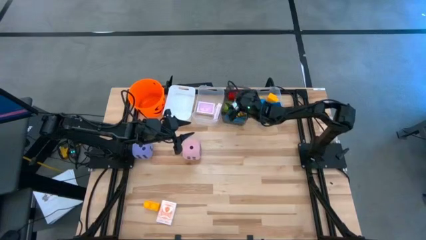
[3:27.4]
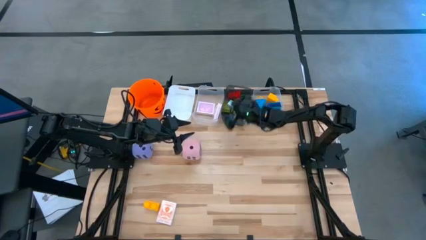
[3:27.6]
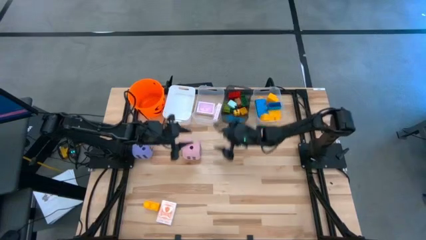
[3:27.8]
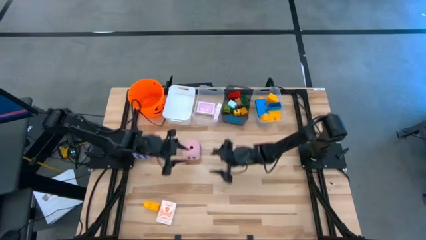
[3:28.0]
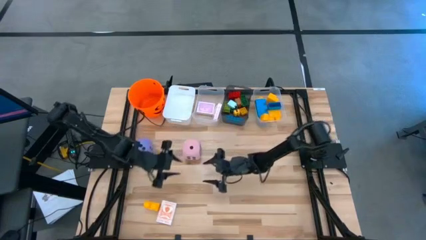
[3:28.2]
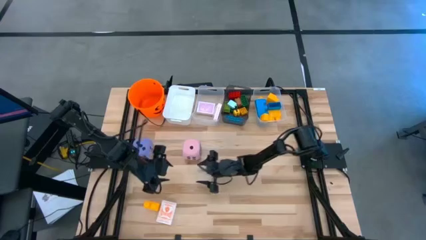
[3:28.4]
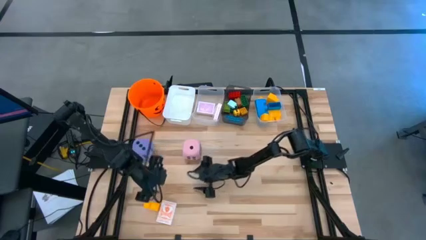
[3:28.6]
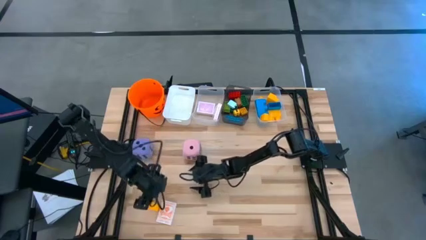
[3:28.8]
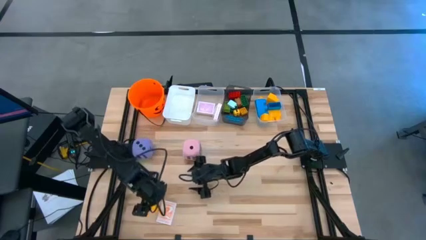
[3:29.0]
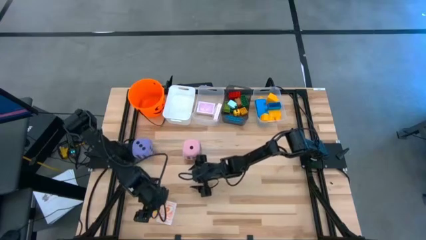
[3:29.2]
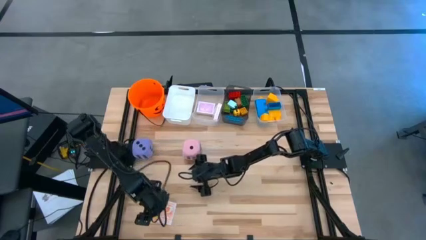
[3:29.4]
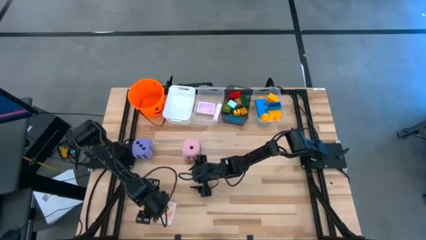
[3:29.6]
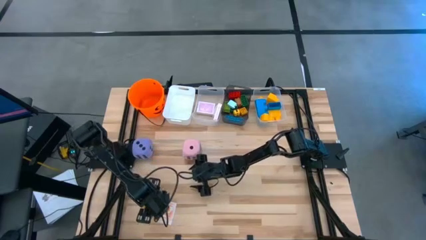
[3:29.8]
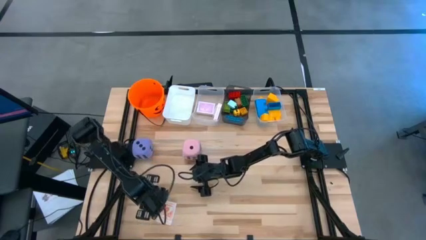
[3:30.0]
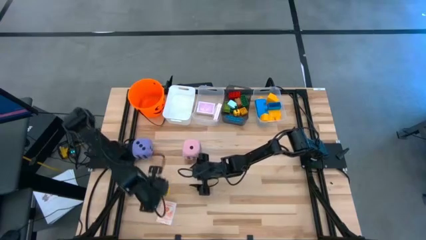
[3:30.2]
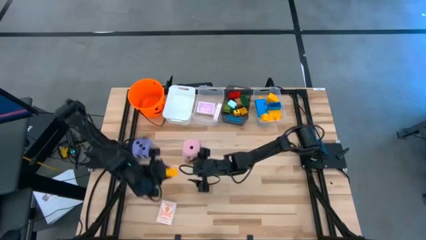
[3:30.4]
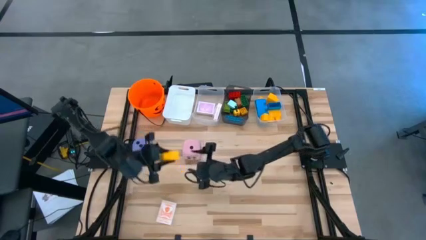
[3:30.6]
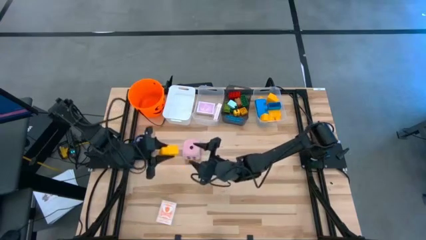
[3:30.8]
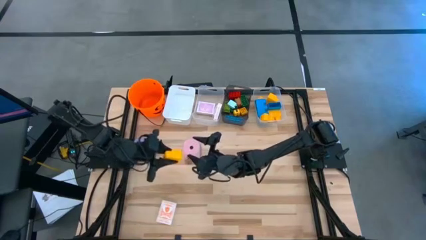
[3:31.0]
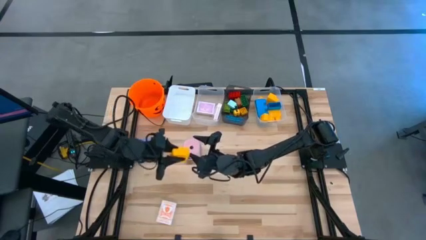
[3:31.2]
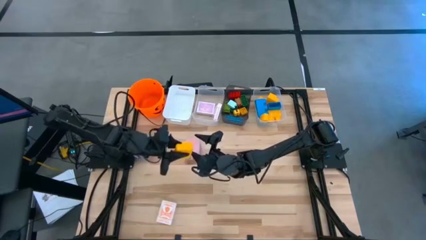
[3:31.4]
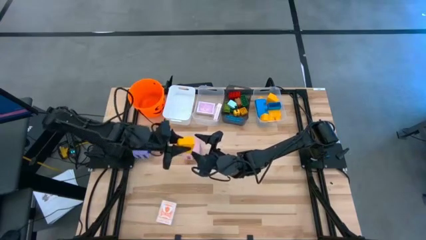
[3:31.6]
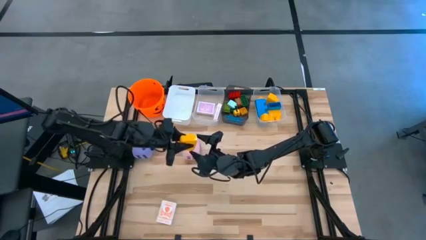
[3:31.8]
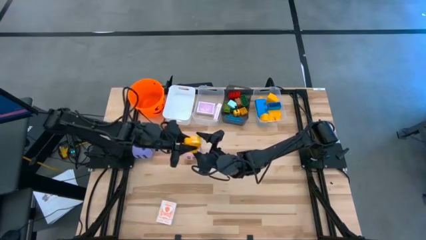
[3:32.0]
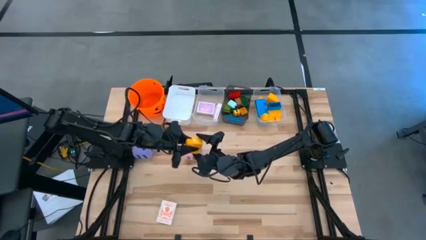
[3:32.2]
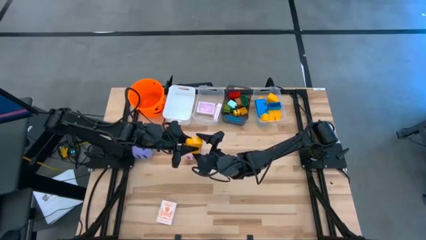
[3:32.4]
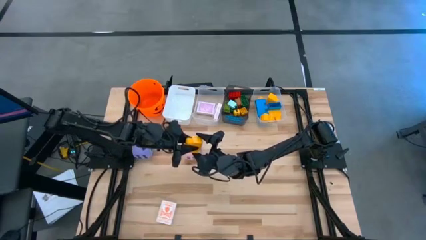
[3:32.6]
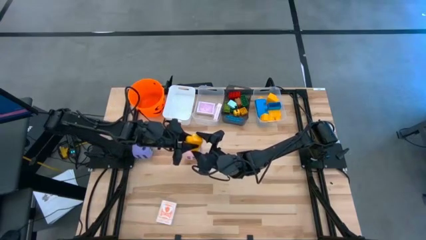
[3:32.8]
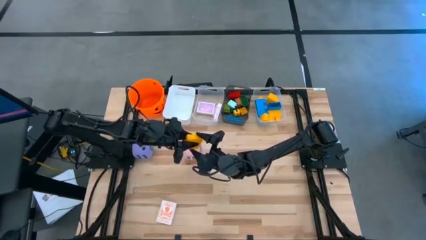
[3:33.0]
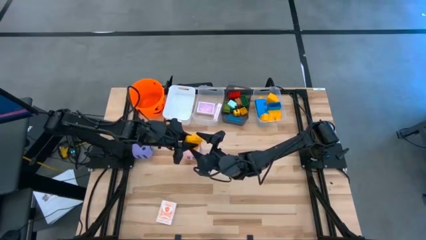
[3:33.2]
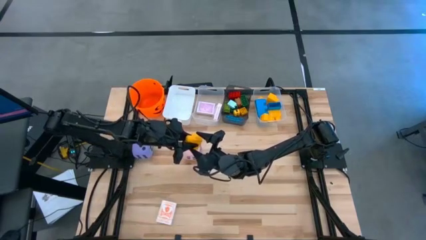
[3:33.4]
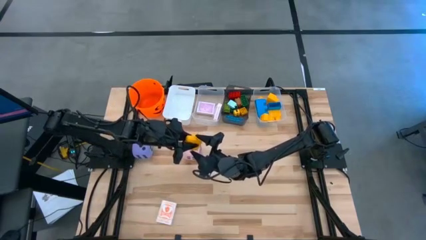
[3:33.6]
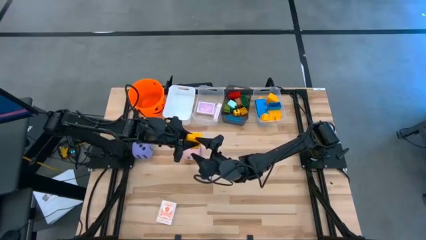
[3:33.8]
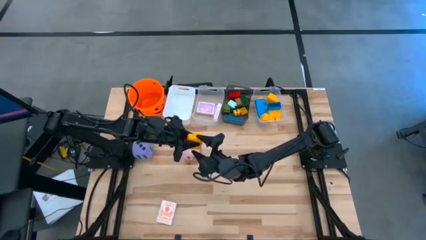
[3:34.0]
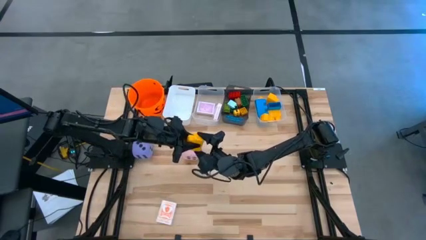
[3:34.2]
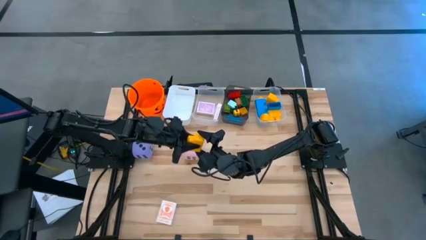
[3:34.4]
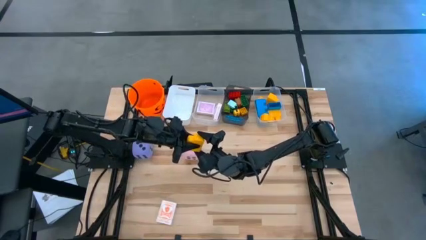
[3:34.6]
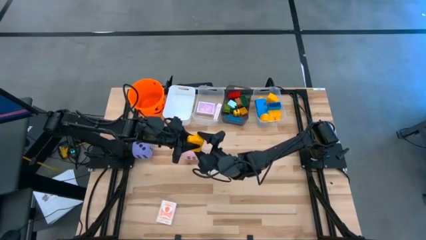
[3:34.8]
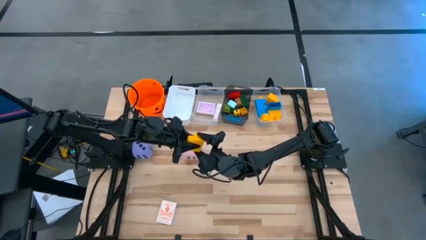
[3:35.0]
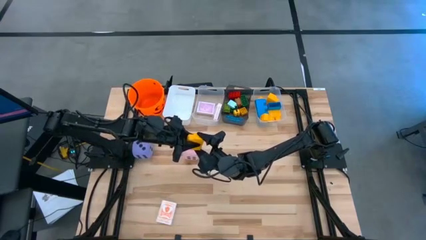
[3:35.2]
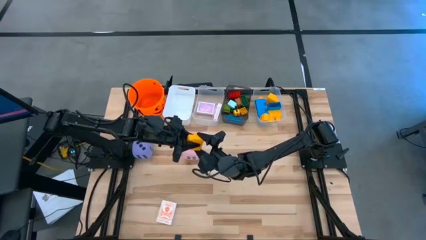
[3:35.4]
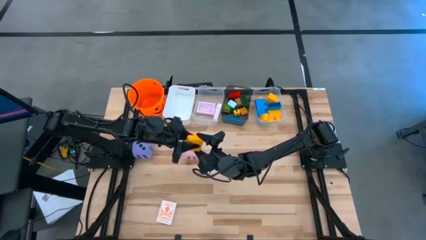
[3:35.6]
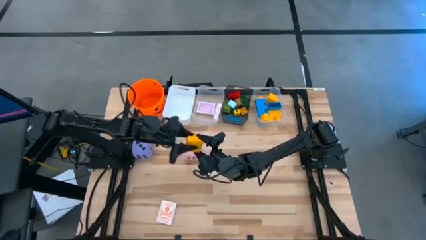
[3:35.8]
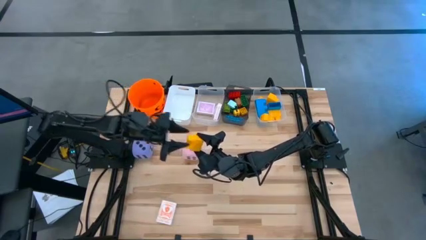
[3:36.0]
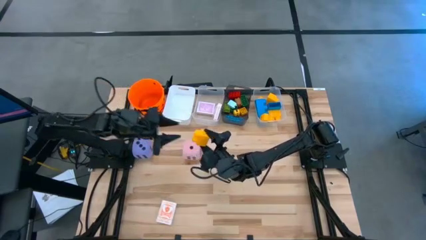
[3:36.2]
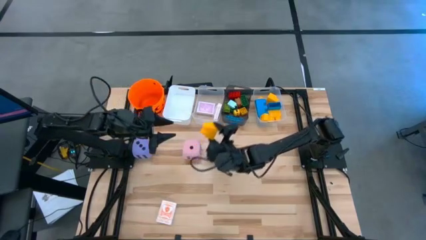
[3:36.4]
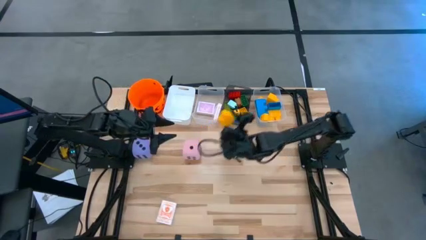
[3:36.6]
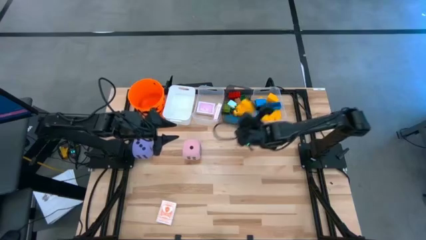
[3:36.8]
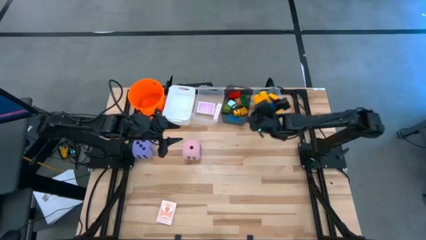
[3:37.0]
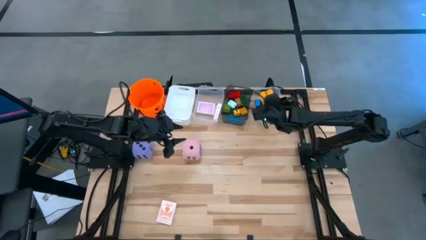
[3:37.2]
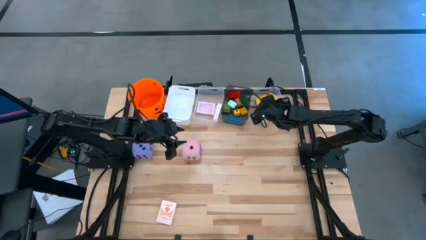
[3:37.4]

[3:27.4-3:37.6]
Task: Pick & Place Toys
Put the big yellow game piece into the right transparent bin
